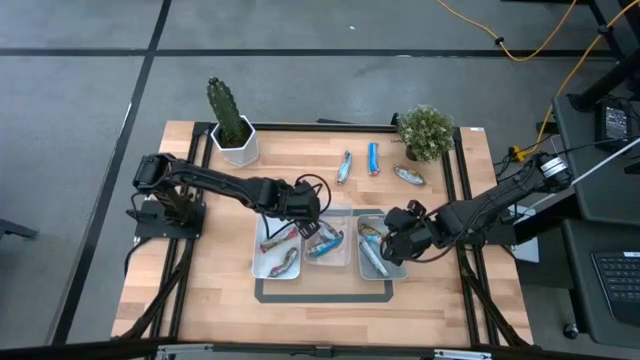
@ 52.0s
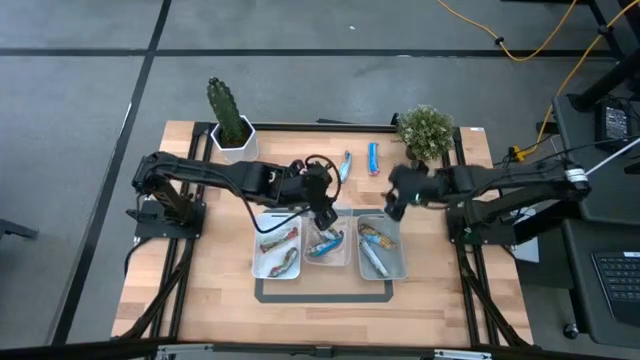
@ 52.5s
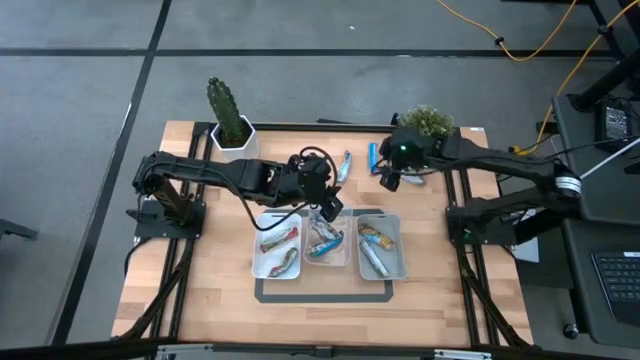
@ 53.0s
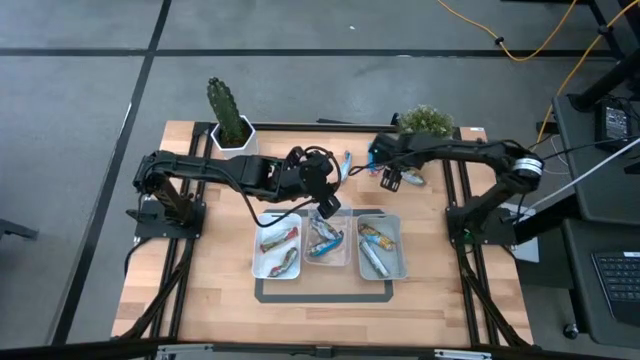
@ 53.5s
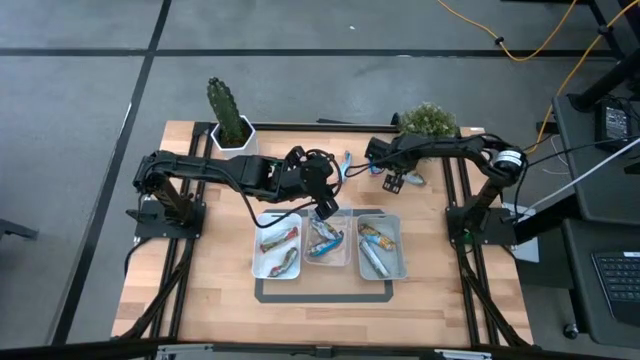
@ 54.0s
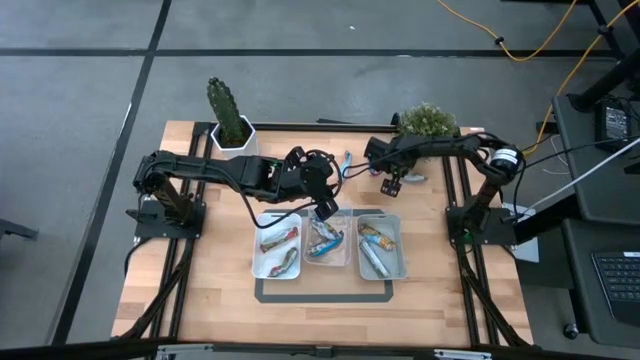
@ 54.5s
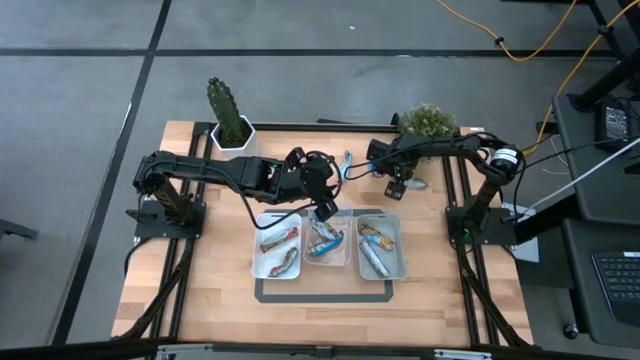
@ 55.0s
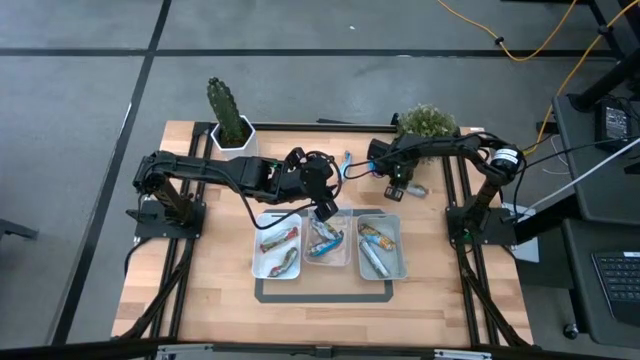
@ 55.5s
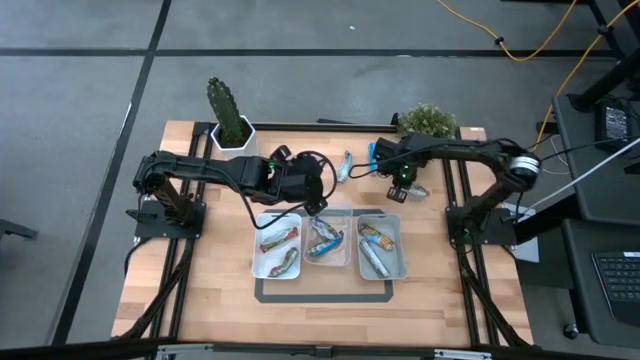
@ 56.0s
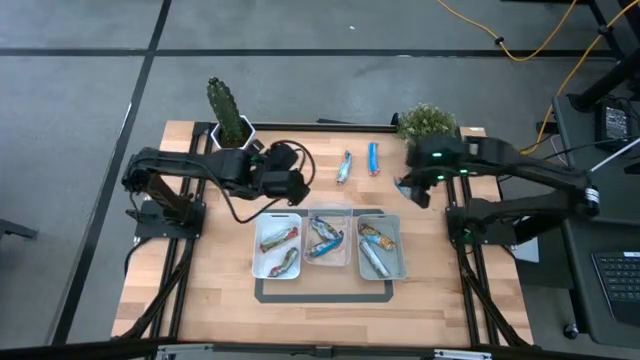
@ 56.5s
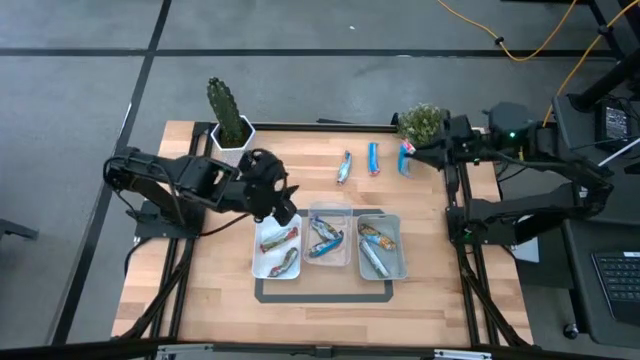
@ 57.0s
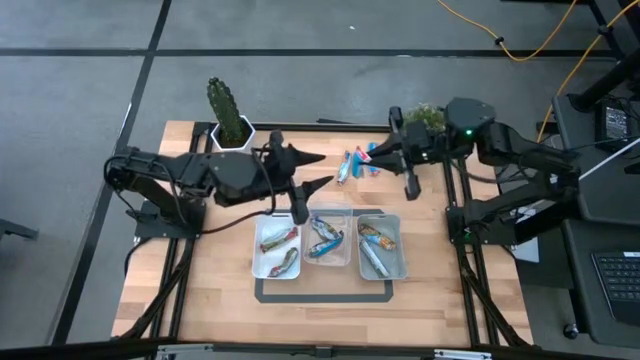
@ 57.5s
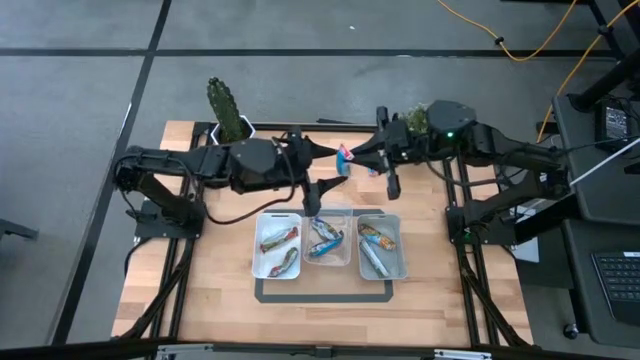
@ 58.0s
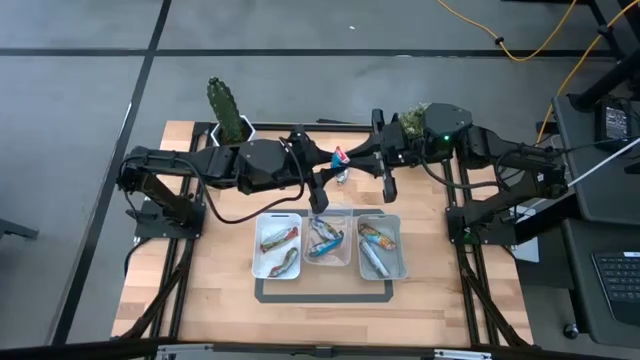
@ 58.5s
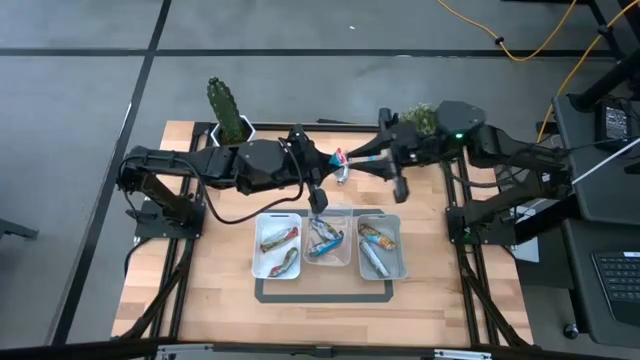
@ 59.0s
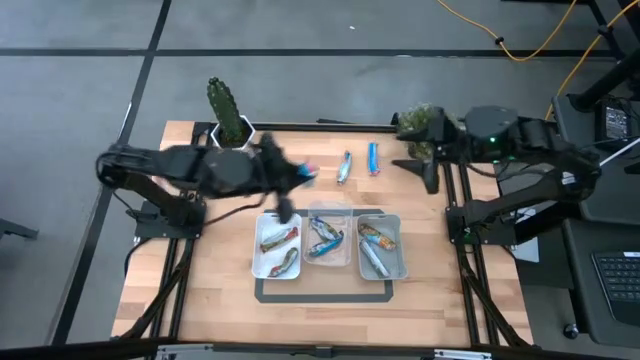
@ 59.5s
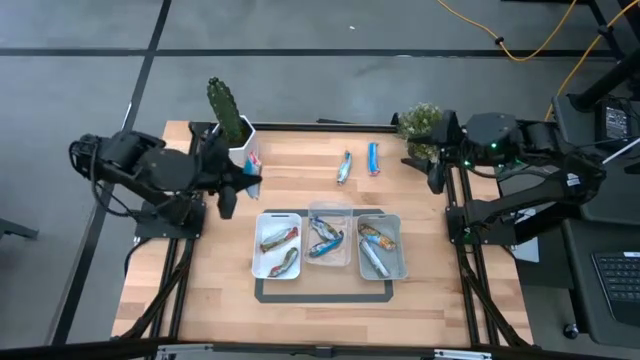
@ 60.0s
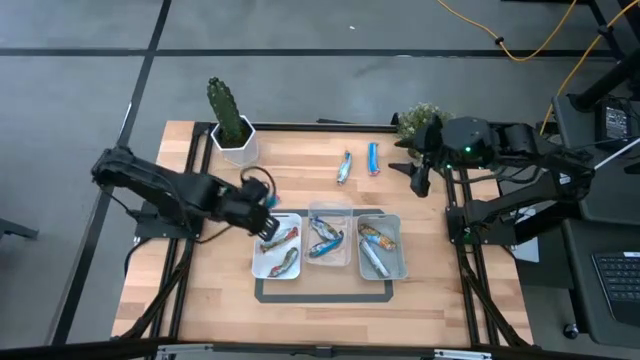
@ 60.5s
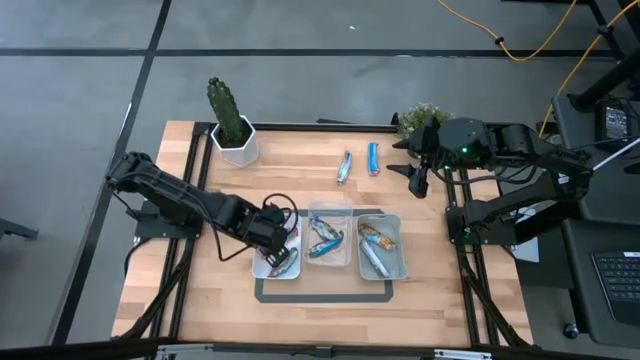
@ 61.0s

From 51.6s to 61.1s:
Task: Pick and place Granola Bars by type
Put the red granola bar into the white bin

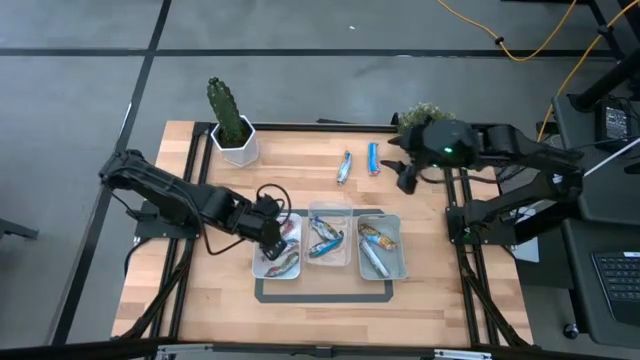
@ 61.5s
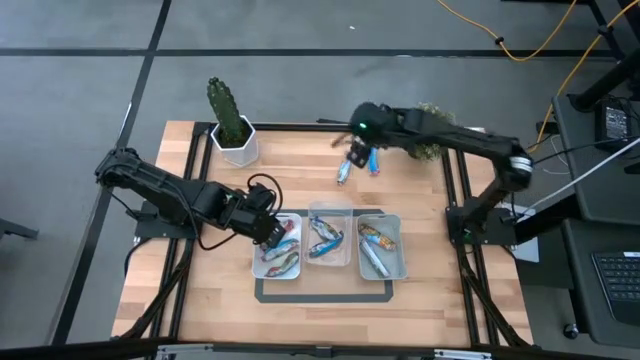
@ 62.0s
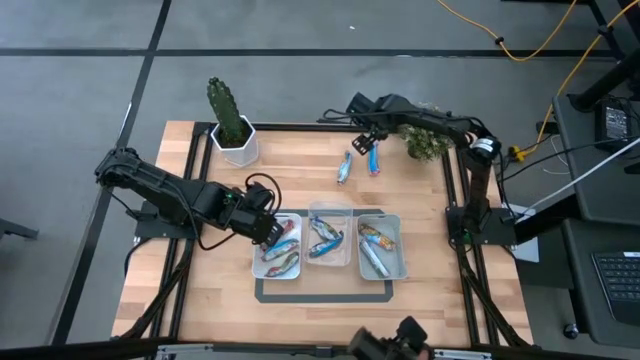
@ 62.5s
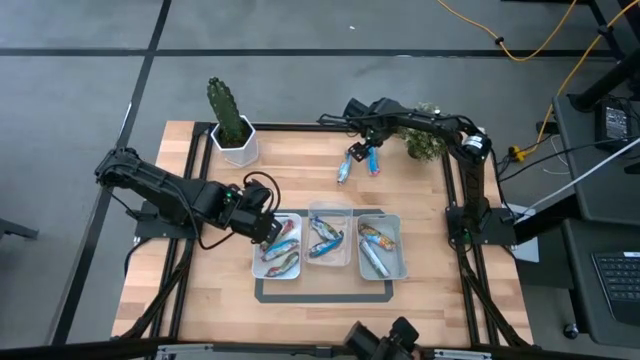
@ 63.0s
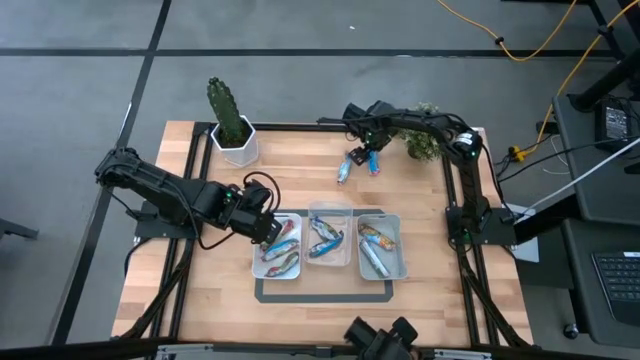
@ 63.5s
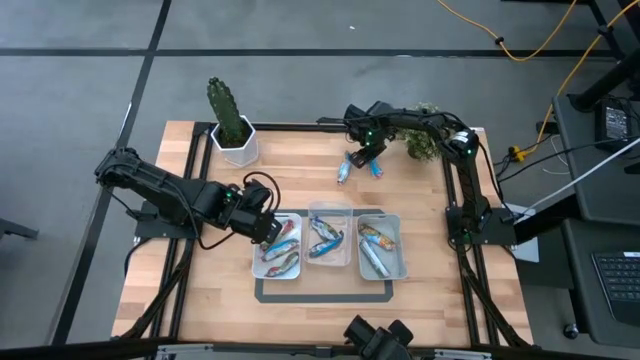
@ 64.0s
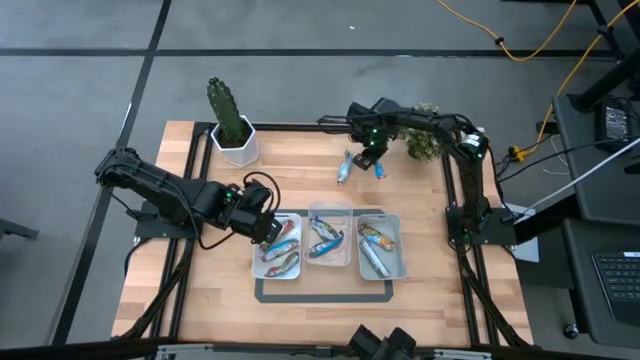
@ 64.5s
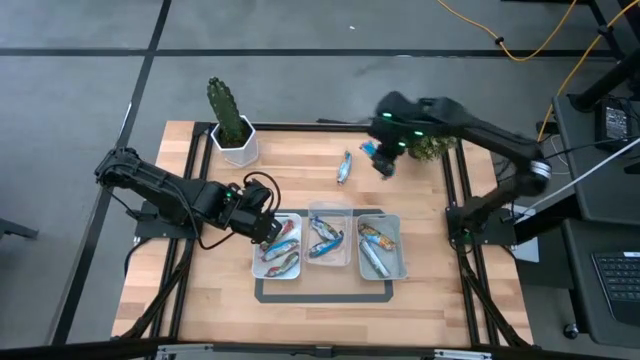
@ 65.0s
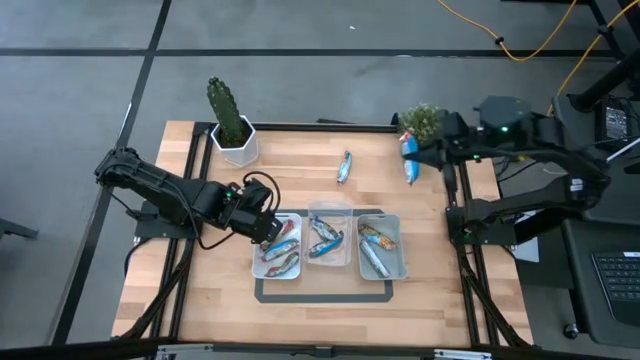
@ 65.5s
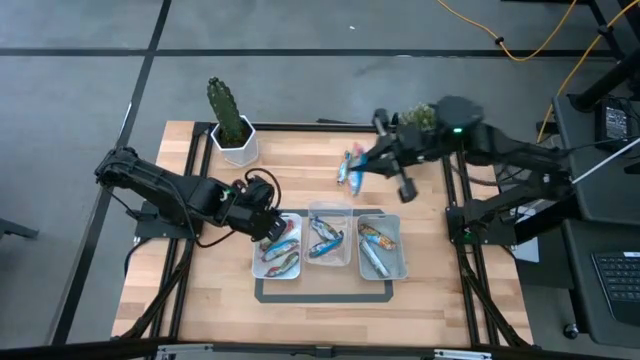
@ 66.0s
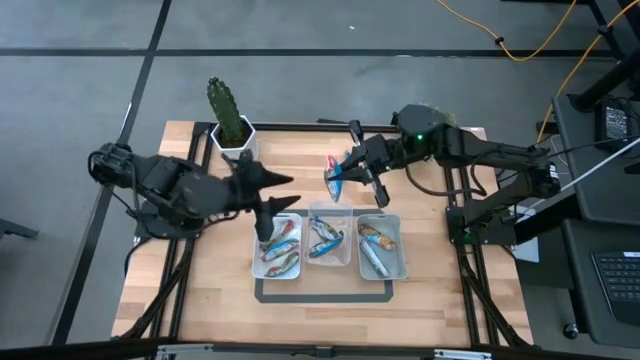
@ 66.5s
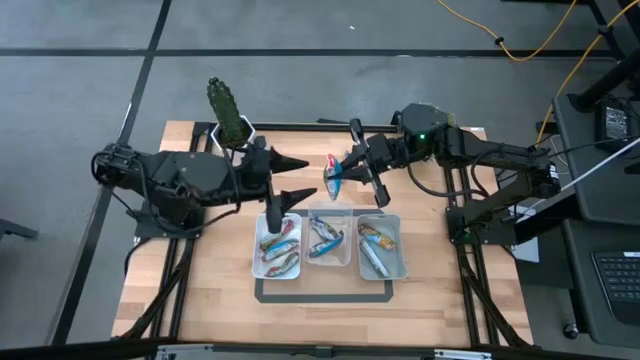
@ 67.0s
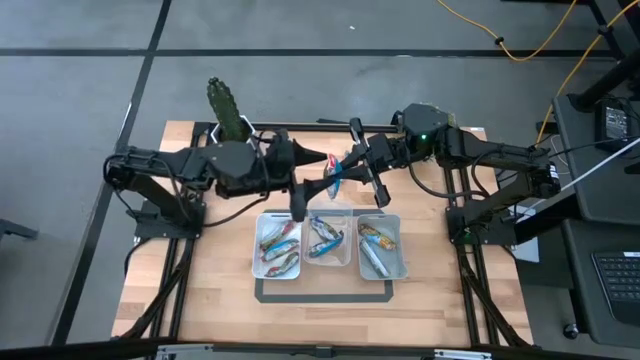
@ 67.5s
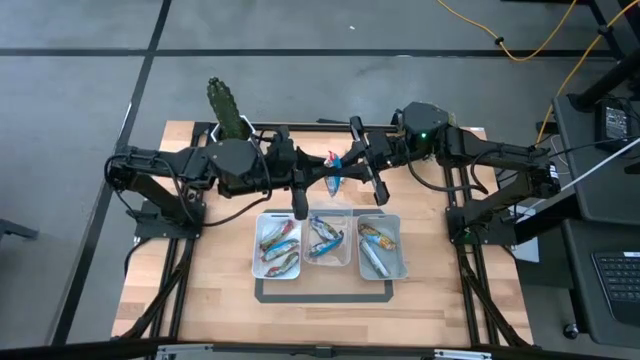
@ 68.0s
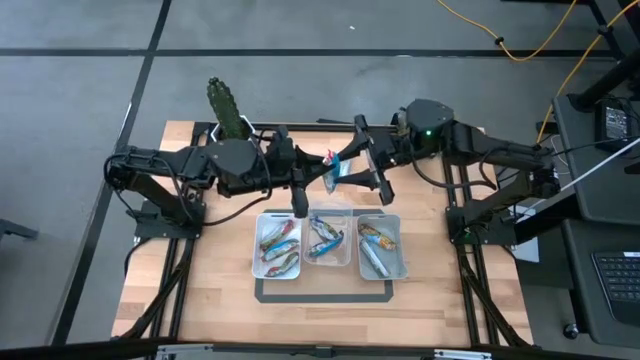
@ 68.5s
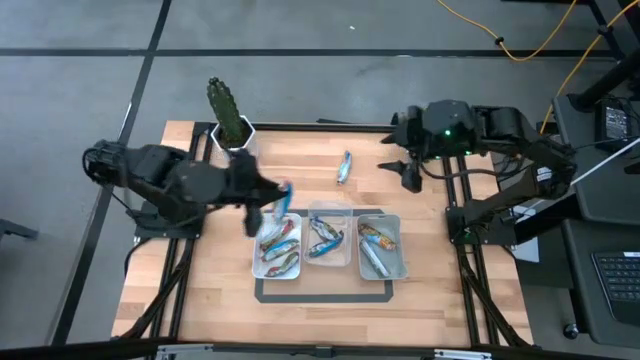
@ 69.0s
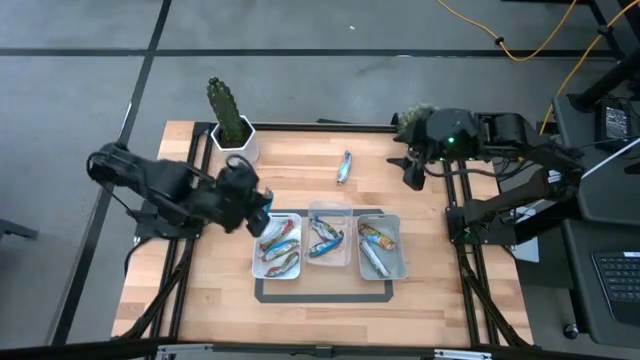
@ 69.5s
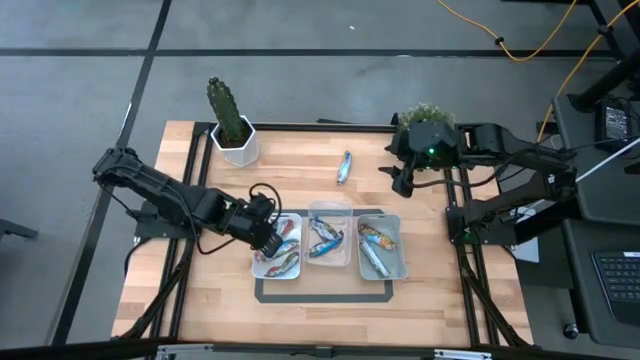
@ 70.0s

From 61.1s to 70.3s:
Put the red granola bar into the white bin

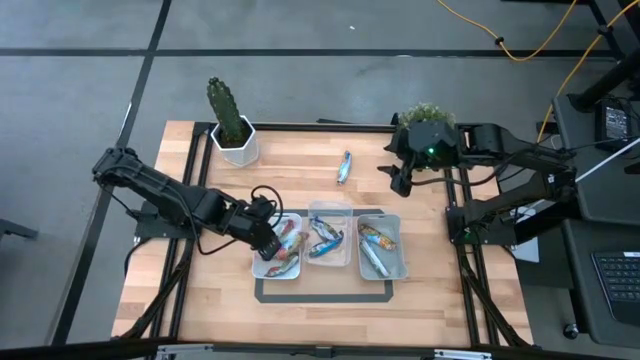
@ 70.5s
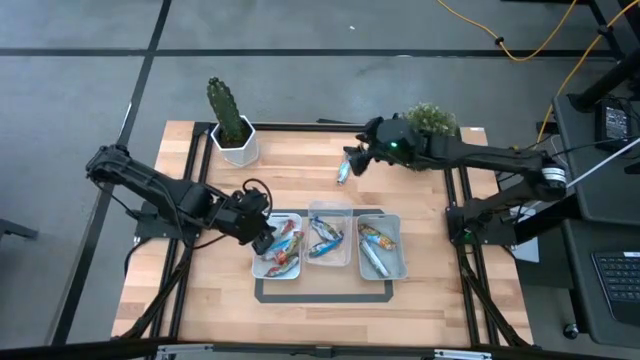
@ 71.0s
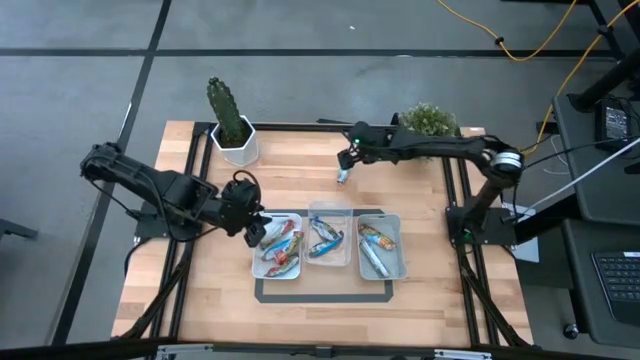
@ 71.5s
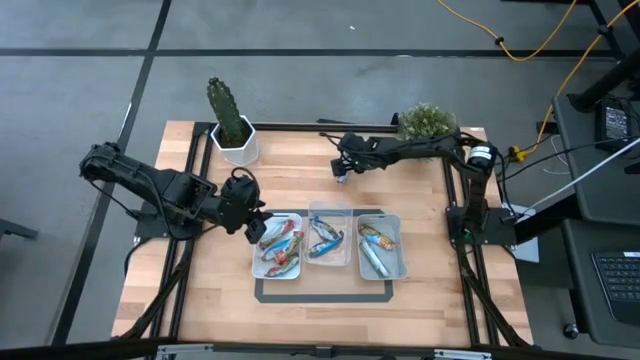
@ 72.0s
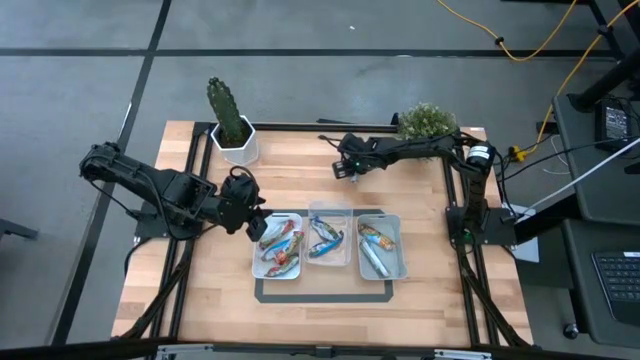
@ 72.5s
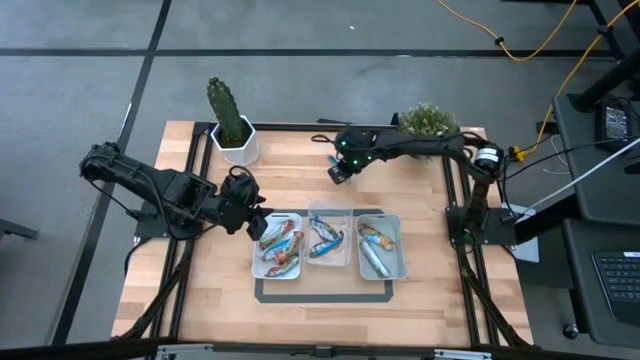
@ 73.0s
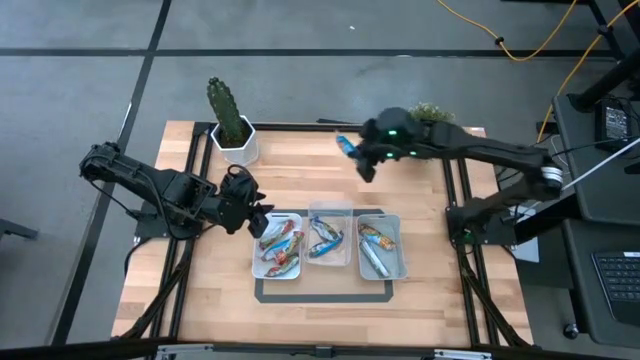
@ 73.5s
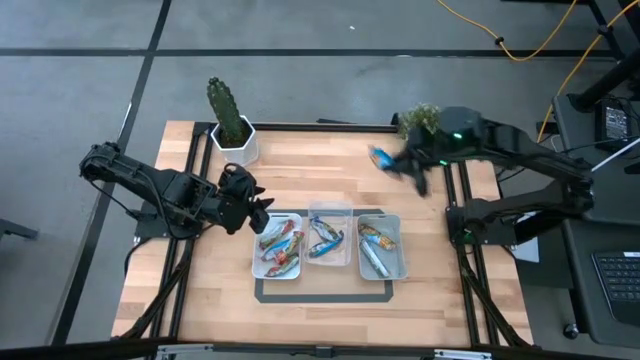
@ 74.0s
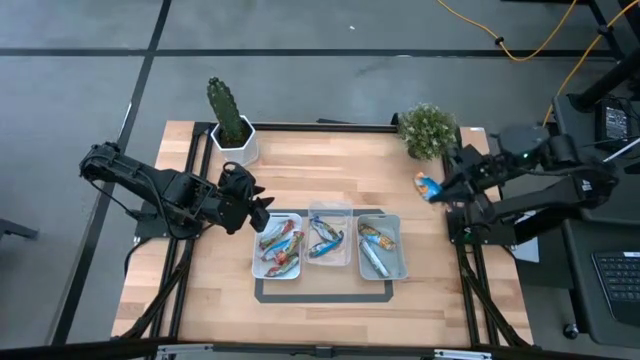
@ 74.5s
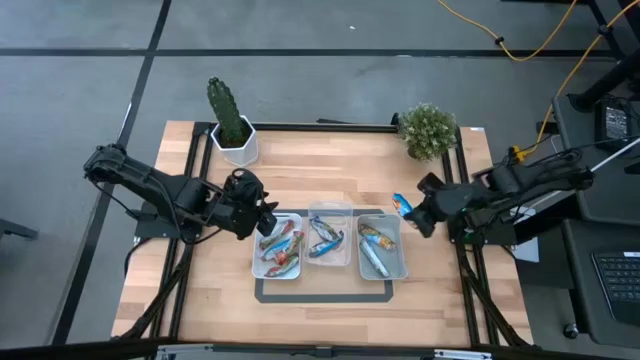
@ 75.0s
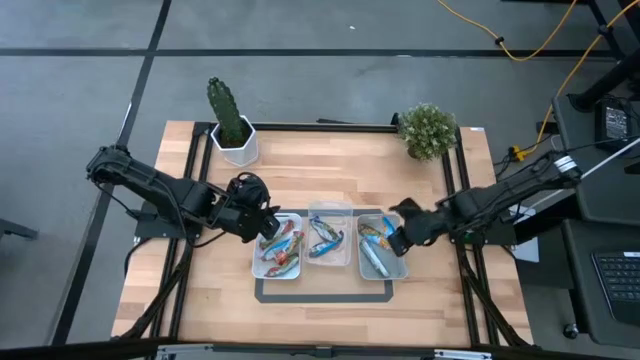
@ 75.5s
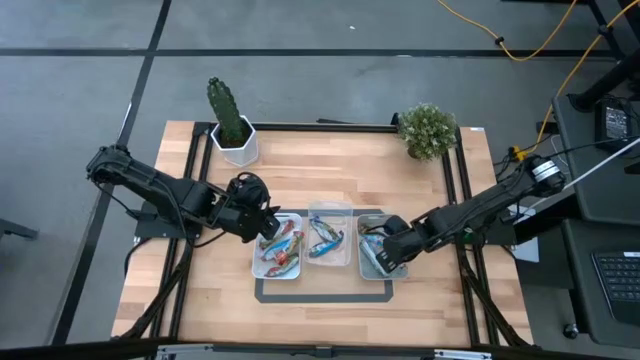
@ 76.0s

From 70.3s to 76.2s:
Put the yellow granola bar into the gray bin
